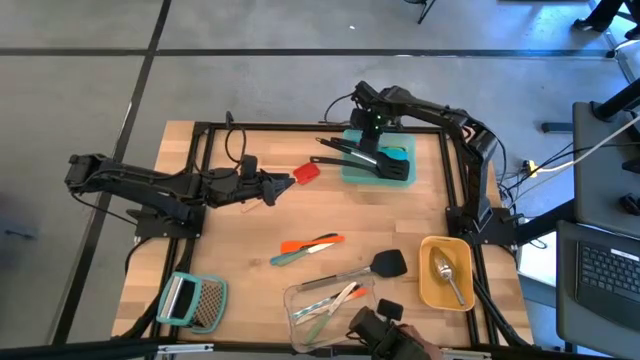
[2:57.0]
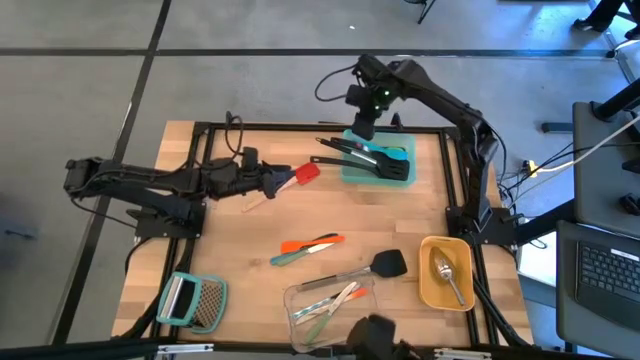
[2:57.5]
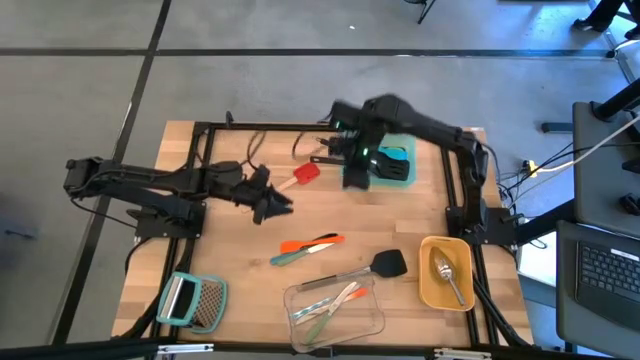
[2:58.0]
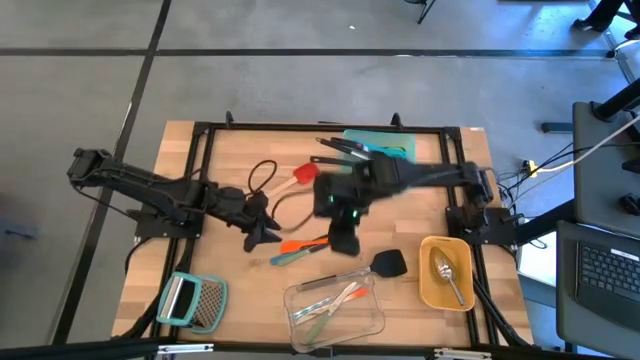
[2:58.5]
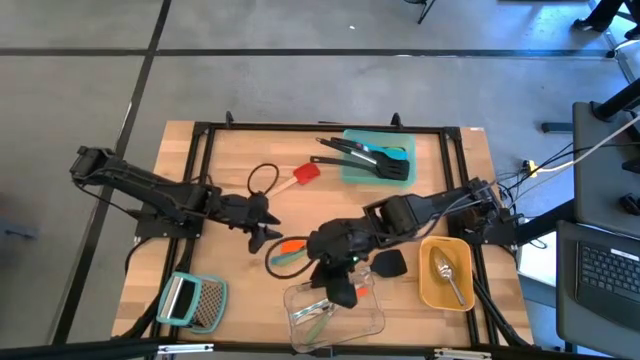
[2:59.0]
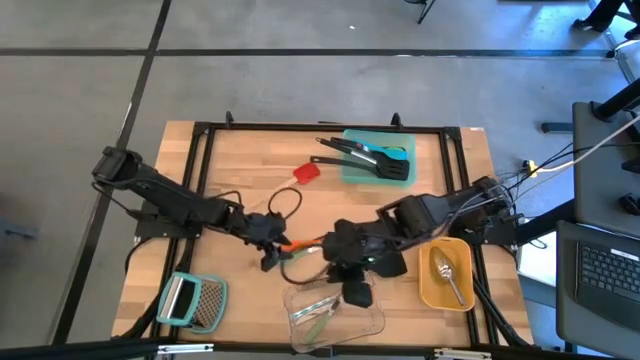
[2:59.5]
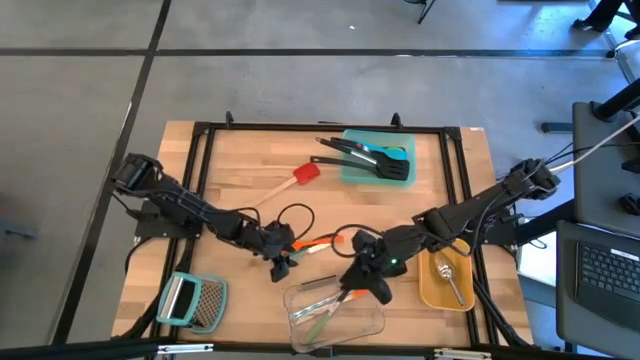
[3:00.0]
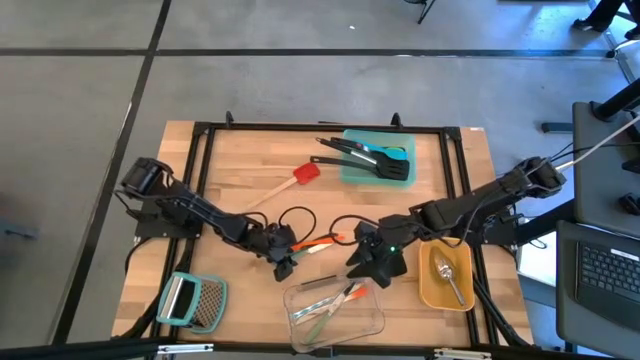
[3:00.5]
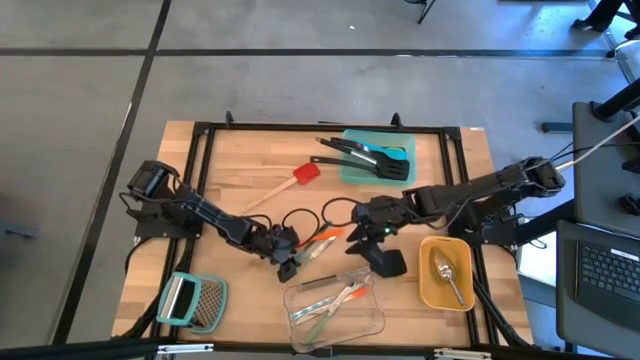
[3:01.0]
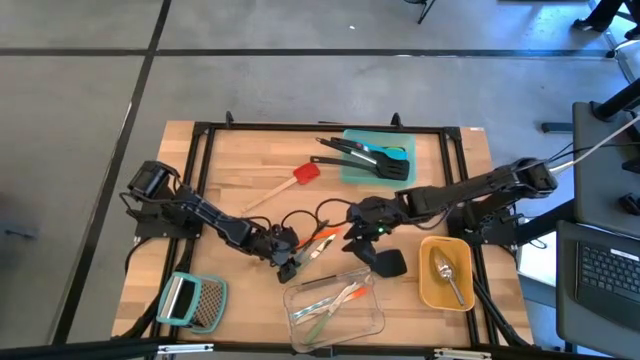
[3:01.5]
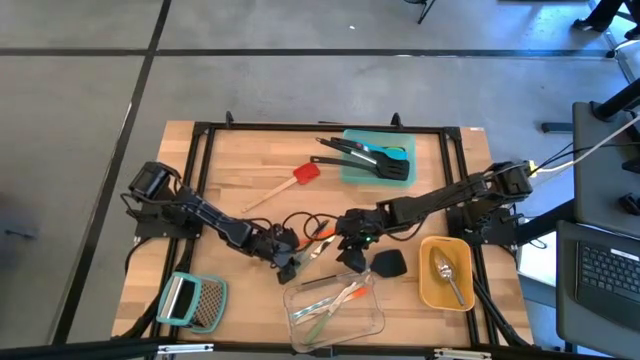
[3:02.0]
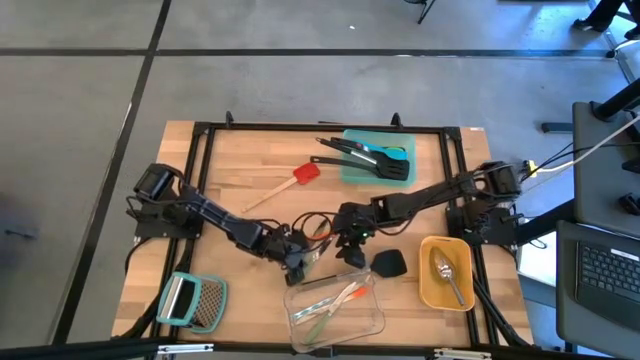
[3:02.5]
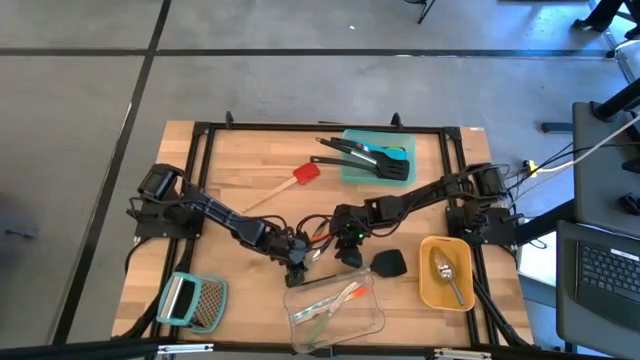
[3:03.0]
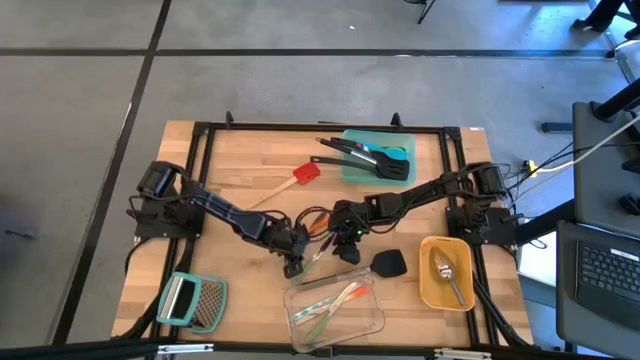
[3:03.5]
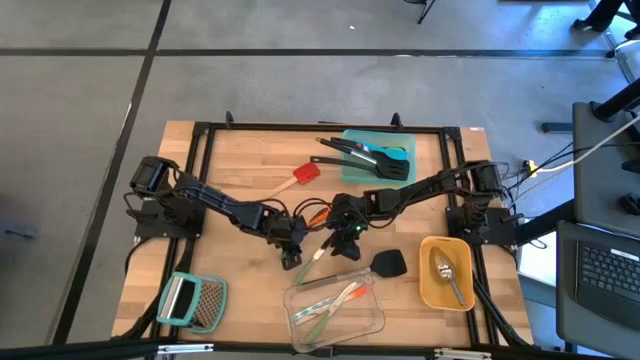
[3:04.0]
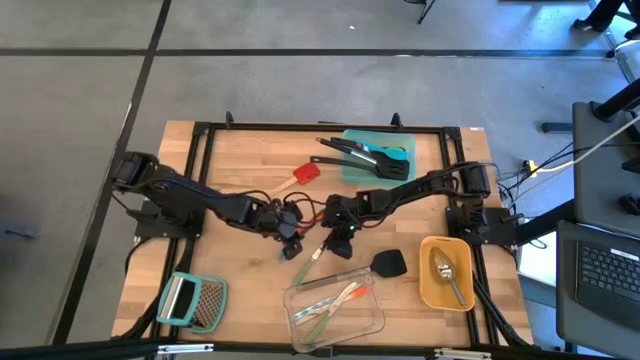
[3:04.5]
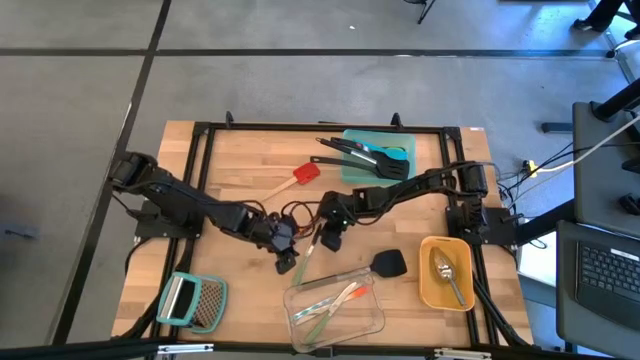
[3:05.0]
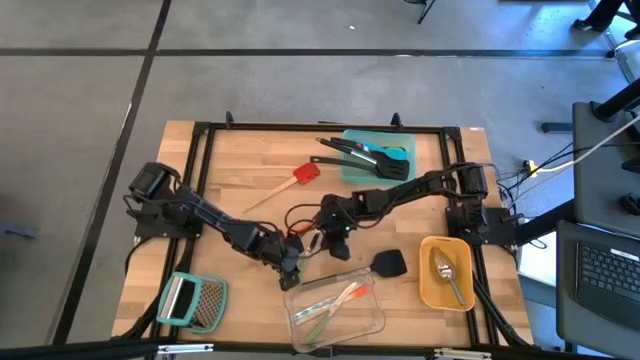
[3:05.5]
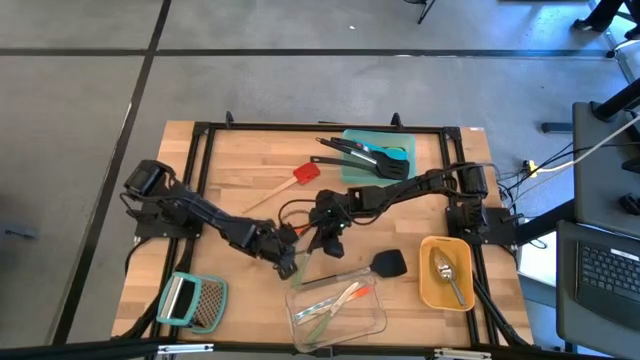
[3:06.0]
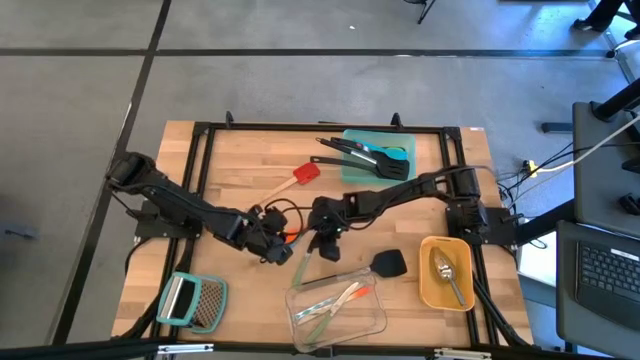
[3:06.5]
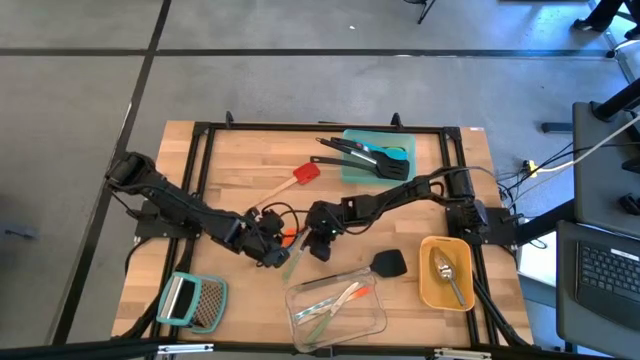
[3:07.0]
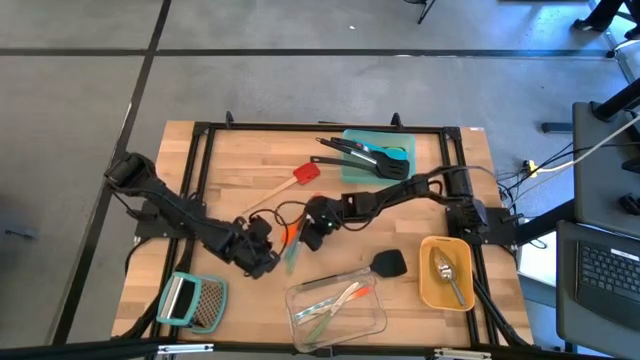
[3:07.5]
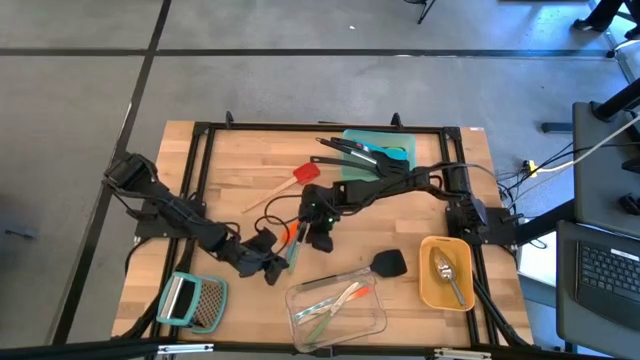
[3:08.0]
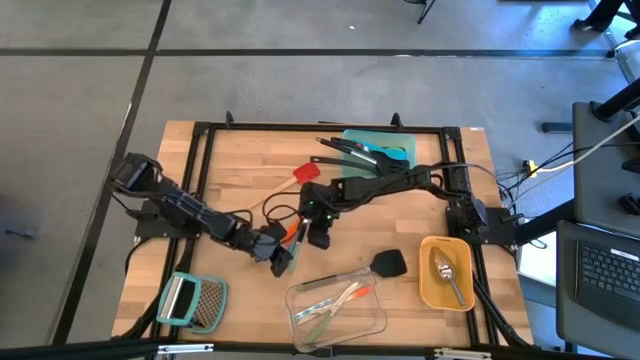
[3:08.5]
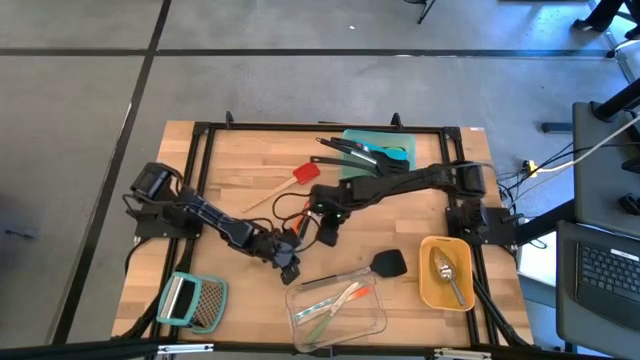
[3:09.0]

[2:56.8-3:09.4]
Task: Pick & Place Kitchen Items
Put the green table knife into the transparent bin

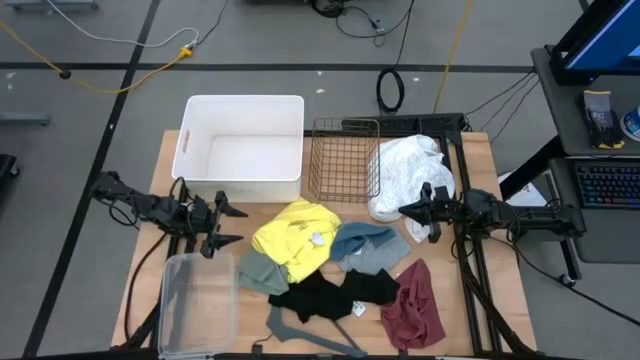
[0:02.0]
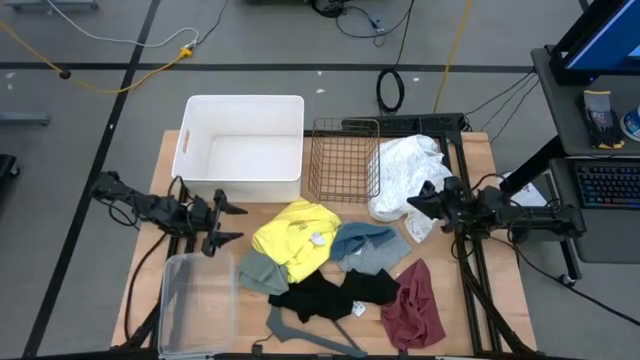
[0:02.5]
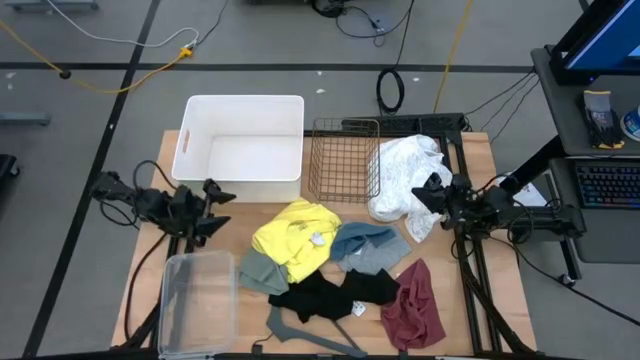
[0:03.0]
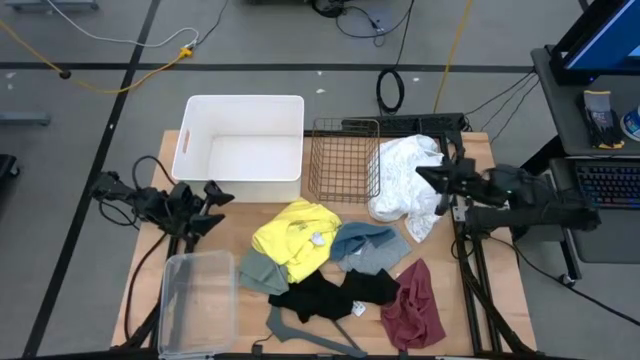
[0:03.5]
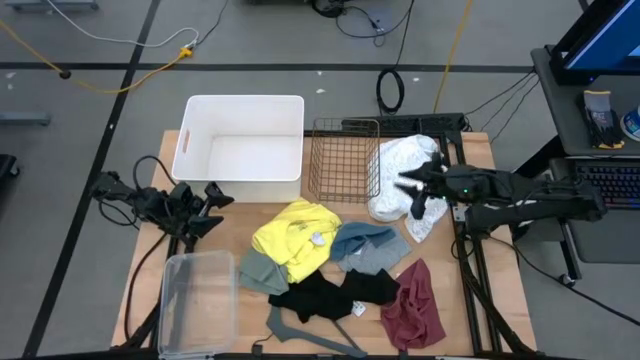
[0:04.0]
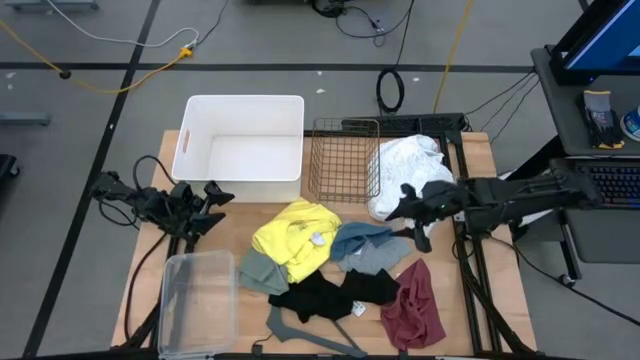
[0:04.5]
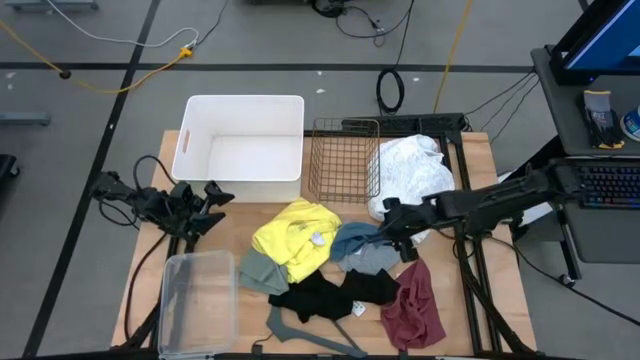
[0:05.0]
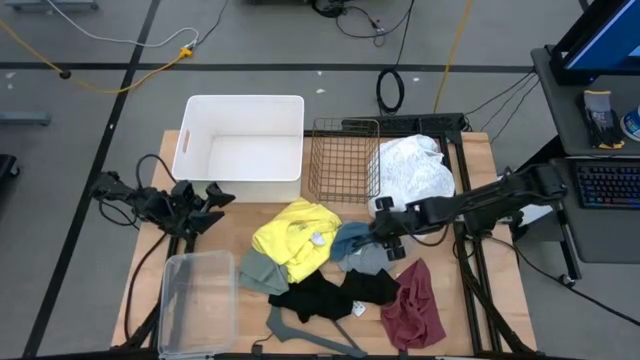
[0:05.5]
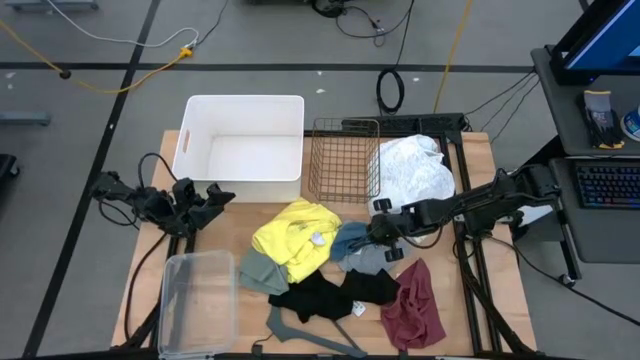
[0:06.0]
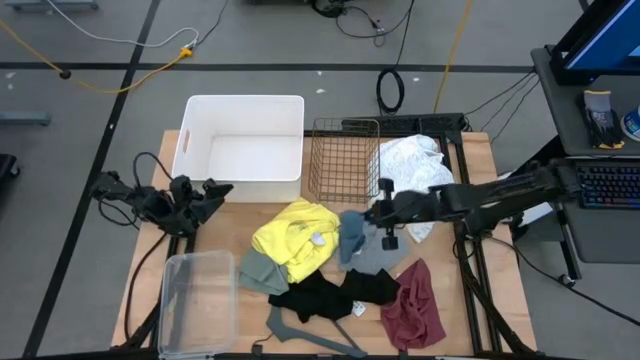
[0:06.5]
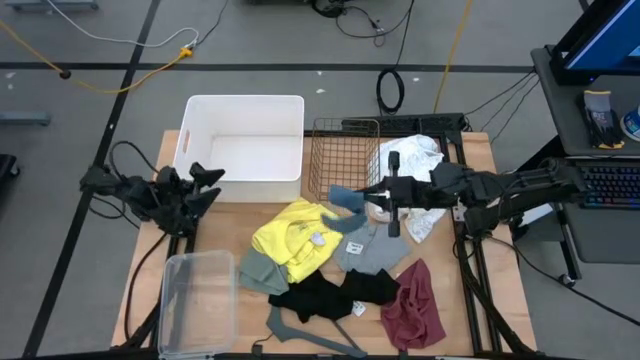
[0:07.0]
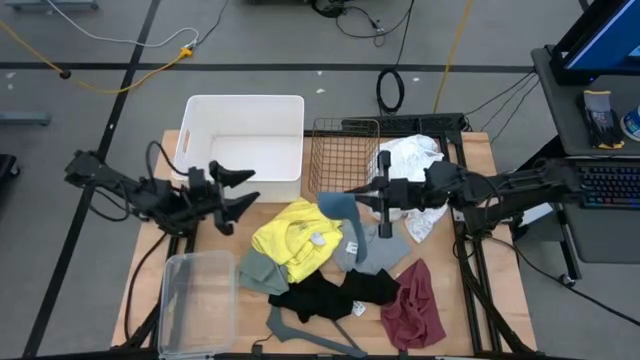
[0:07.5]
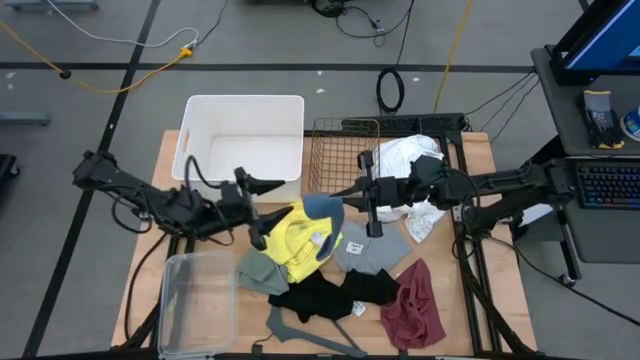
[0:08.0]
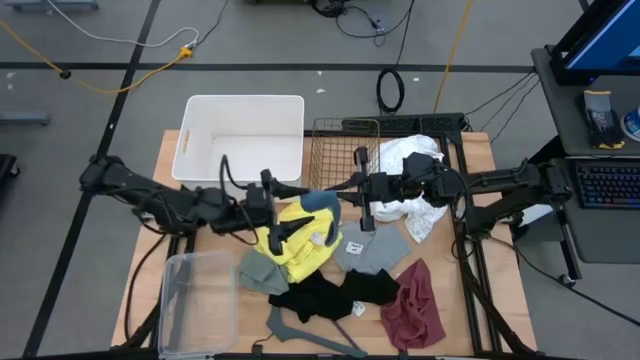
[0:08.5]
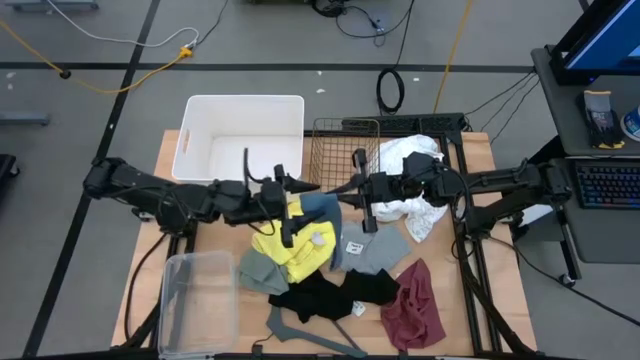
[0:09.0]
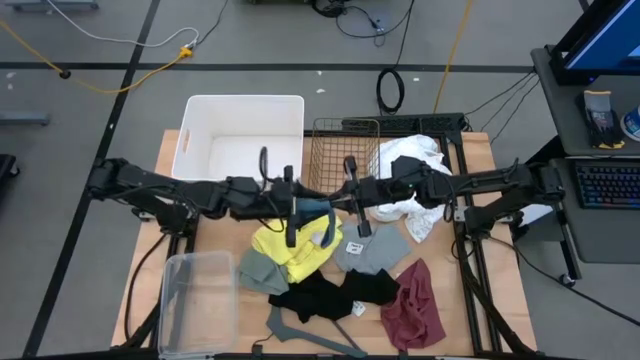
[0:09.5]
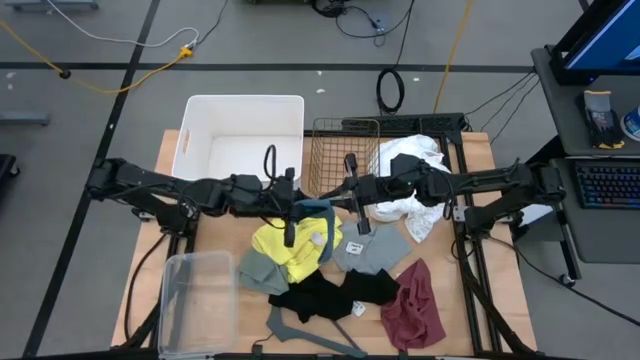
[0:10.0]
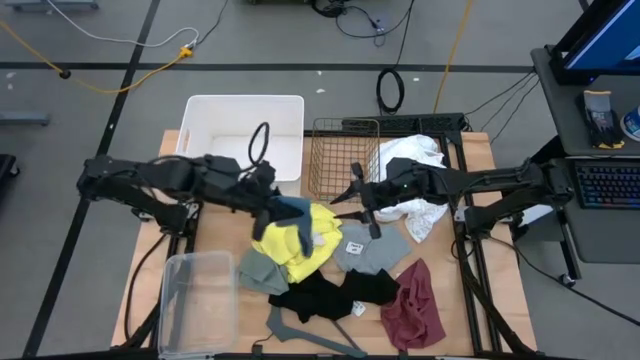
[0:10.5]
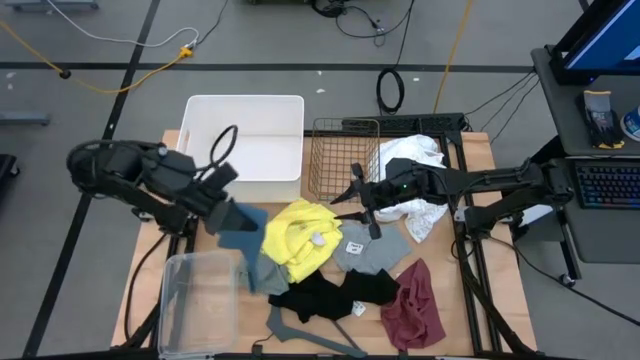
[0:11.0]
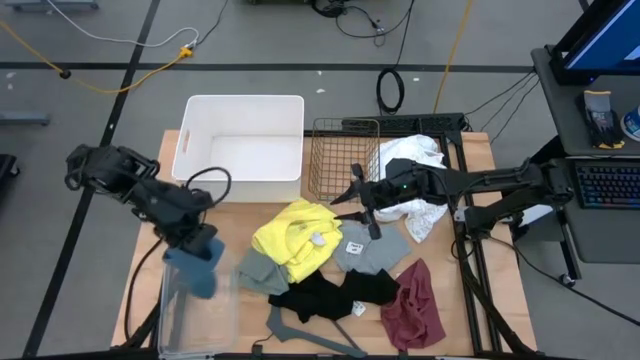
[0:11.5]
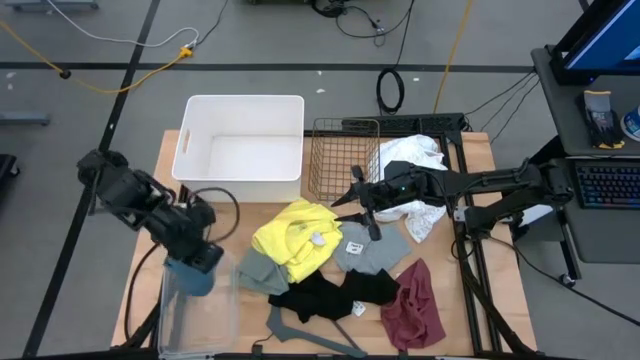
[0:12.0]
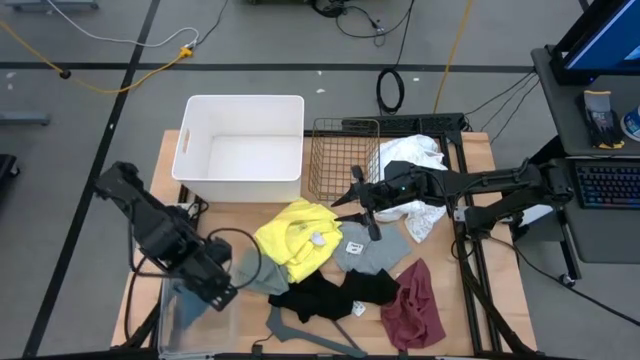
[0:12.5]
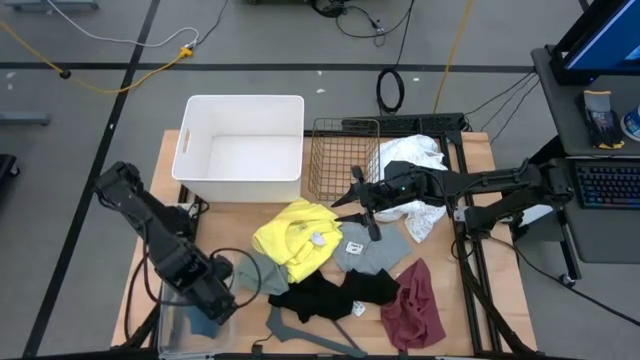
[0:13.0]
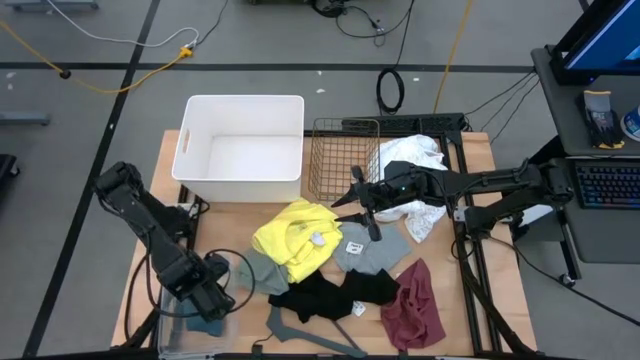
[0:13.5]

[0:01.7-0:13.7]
Task: Pick & Place Cloths
Put the blue sock into the transparent bin
